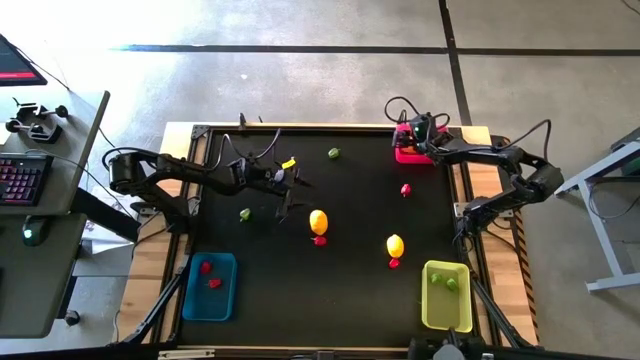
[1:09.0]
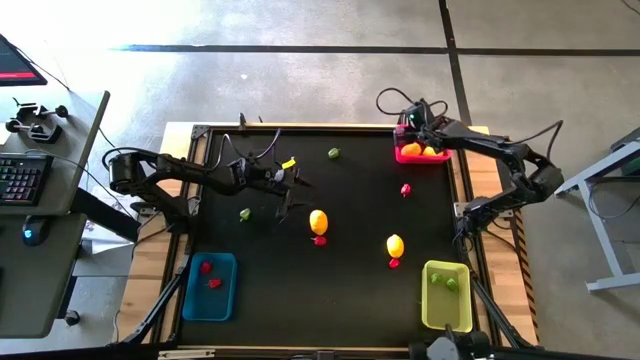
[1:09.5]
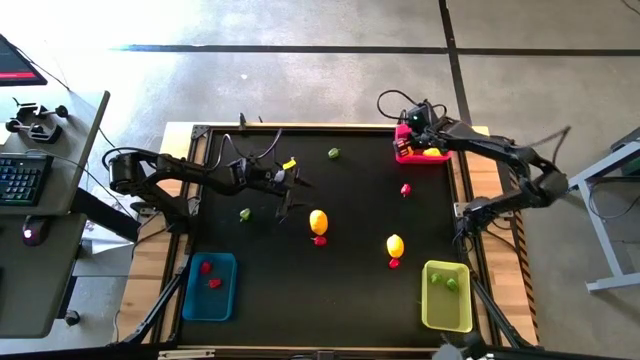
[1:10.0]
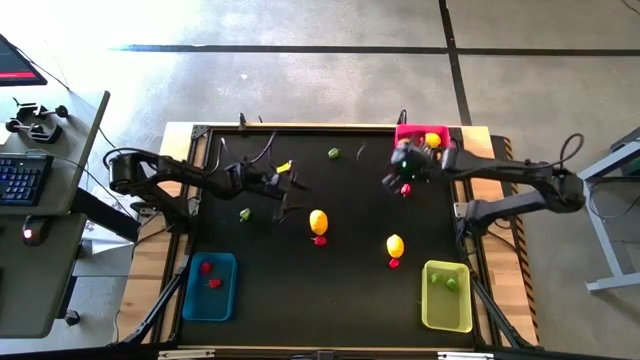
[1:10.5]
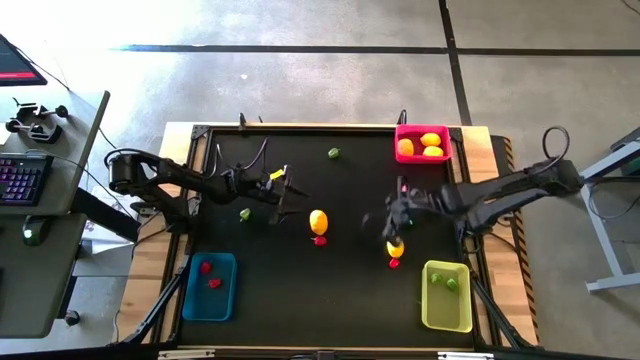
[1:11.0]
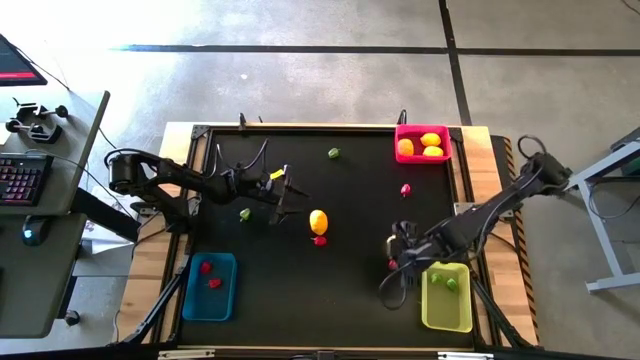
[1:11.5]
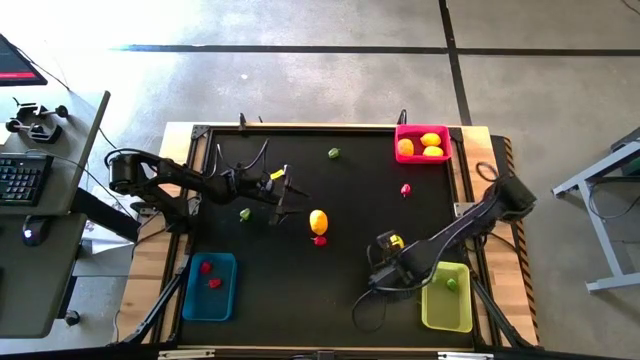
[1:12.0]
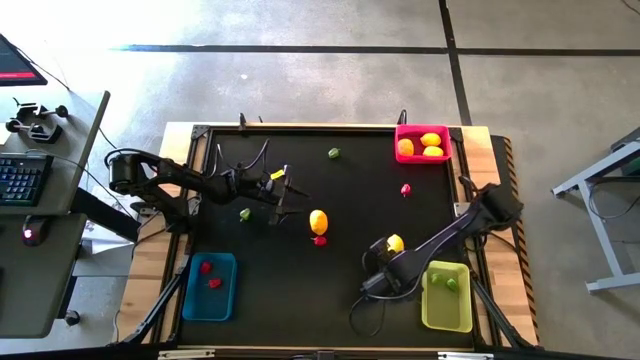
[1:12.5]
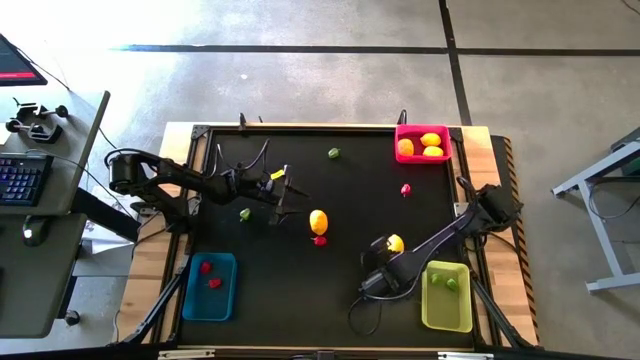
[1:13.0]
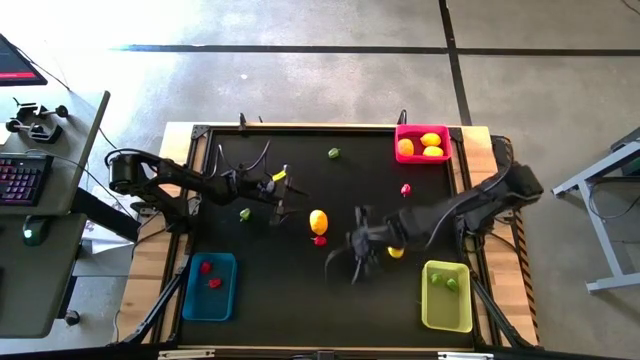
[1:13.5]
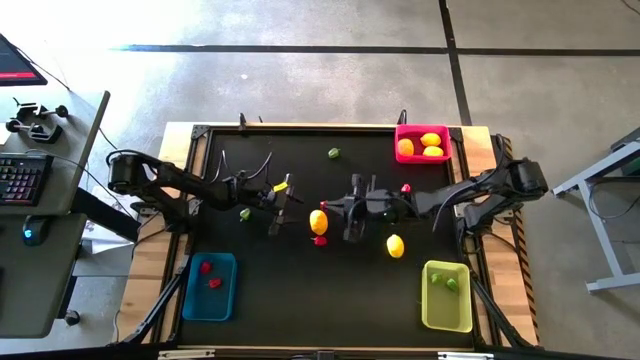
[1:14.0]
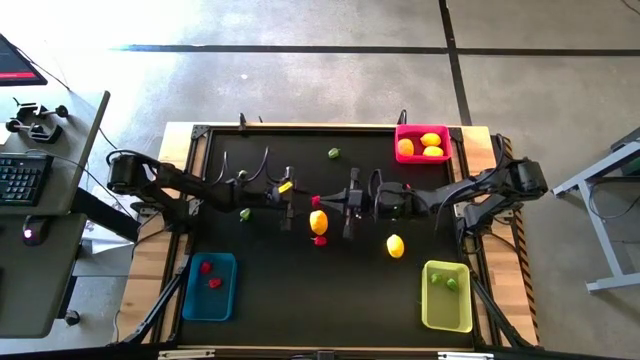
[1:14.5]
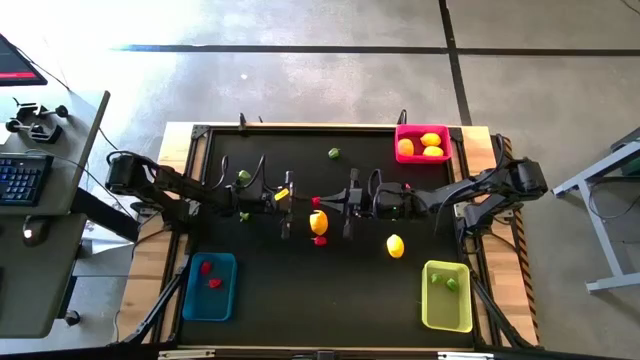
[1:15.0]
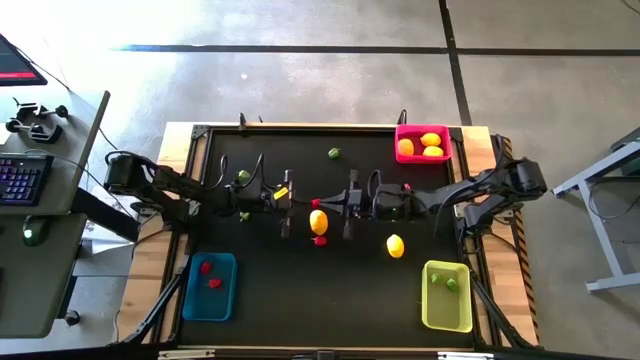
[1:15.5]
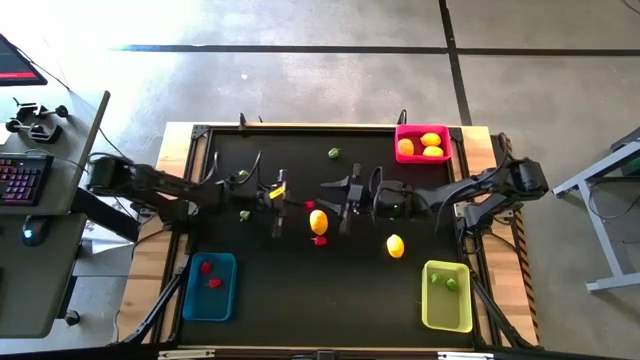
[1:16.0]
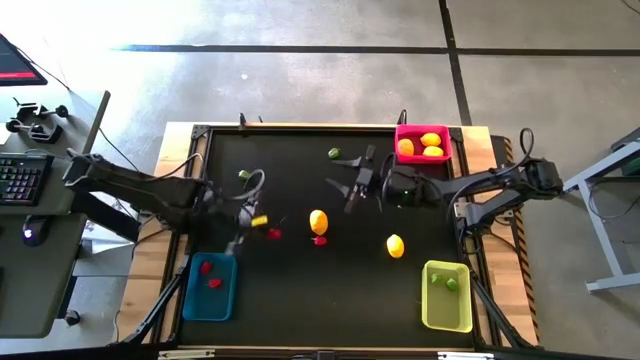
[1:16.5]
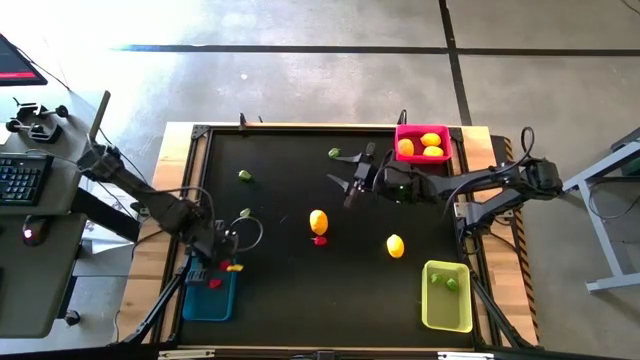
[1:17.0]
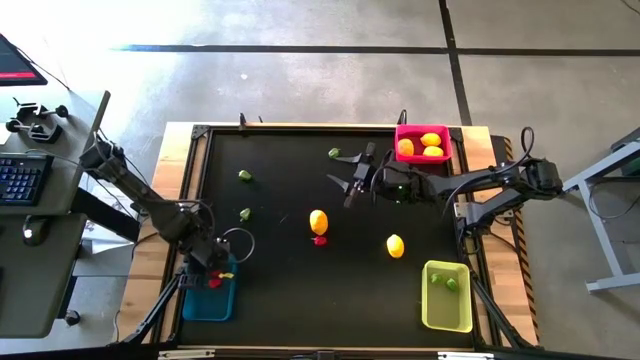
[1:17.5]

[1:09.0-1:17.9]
Task: Sort produce into baskets
Put the red chilli pepper into the blue bin

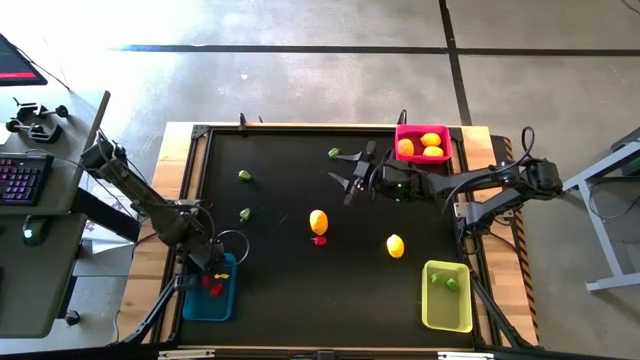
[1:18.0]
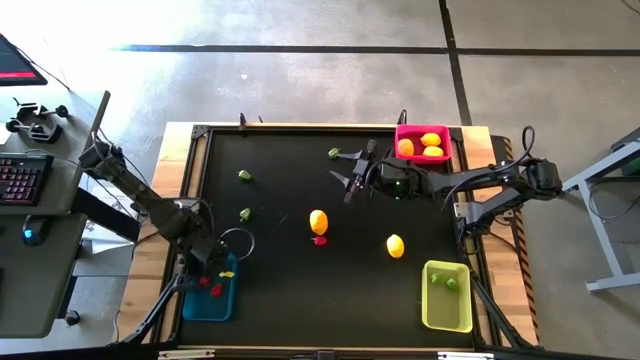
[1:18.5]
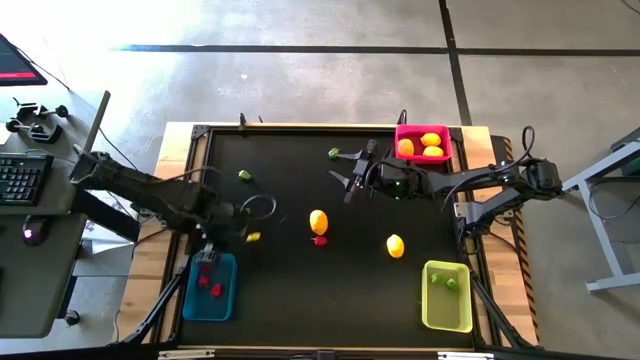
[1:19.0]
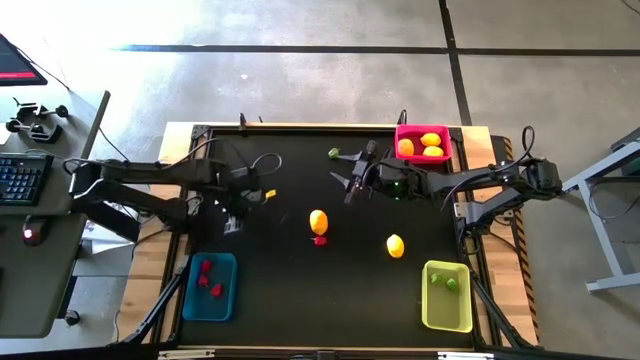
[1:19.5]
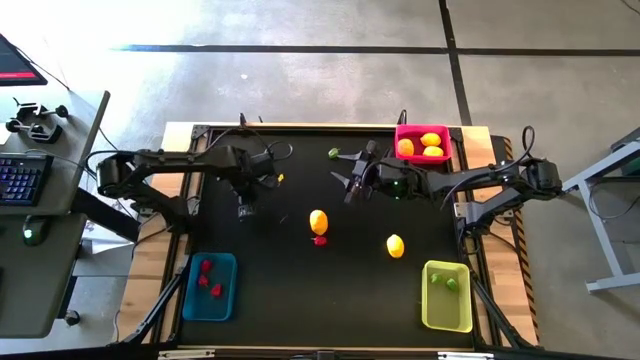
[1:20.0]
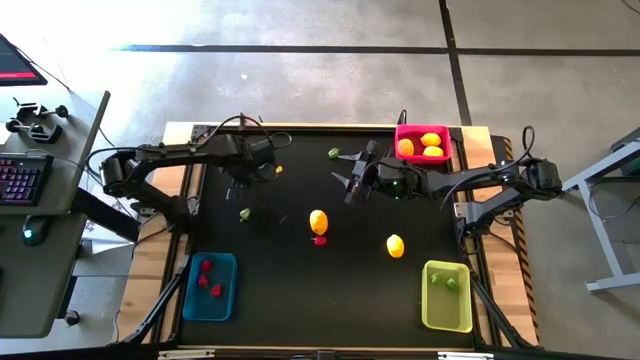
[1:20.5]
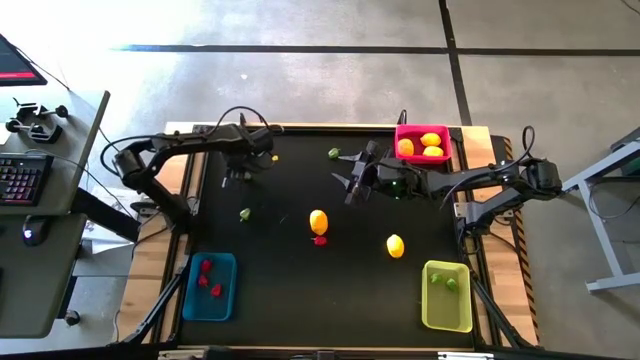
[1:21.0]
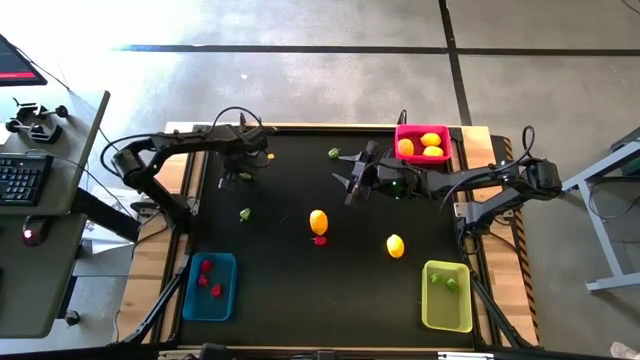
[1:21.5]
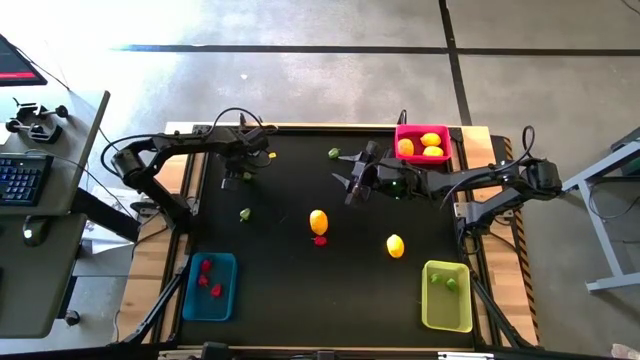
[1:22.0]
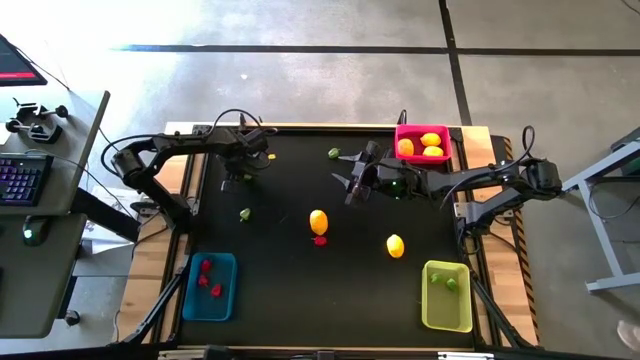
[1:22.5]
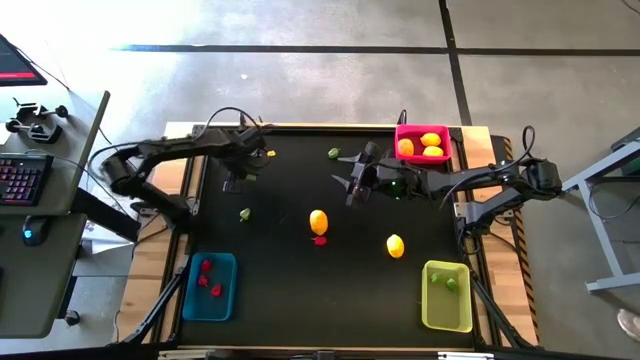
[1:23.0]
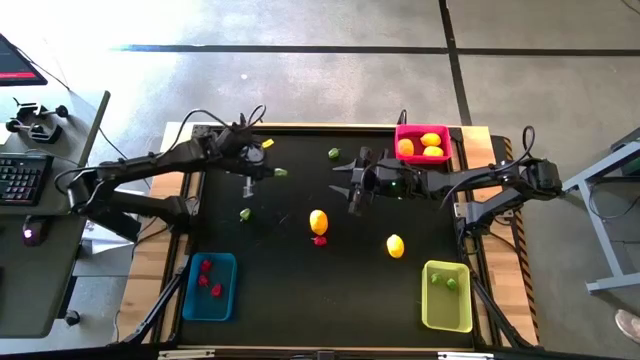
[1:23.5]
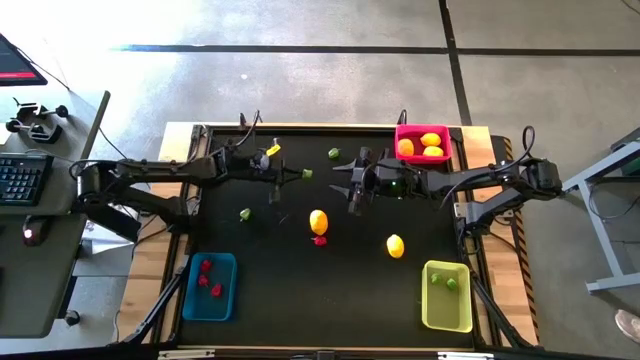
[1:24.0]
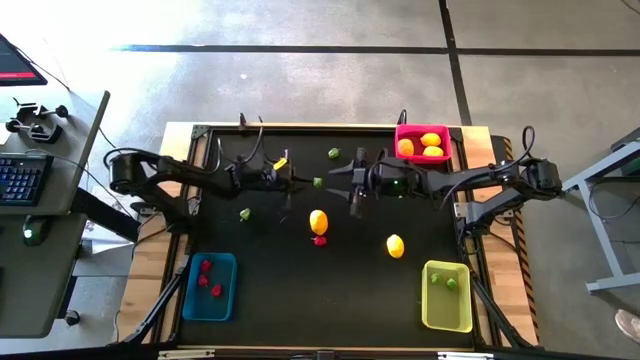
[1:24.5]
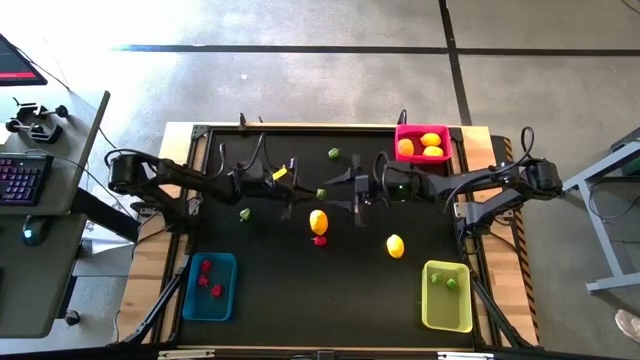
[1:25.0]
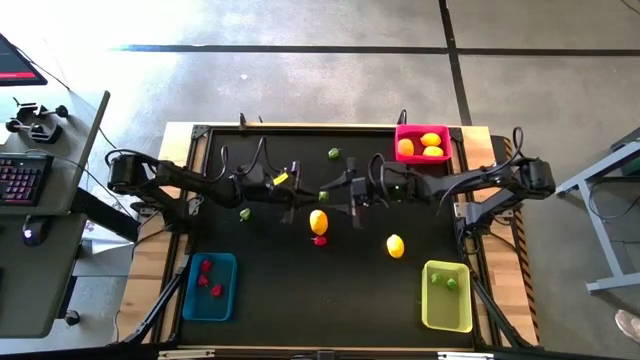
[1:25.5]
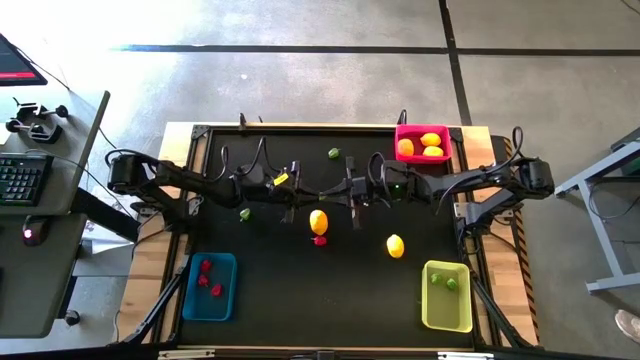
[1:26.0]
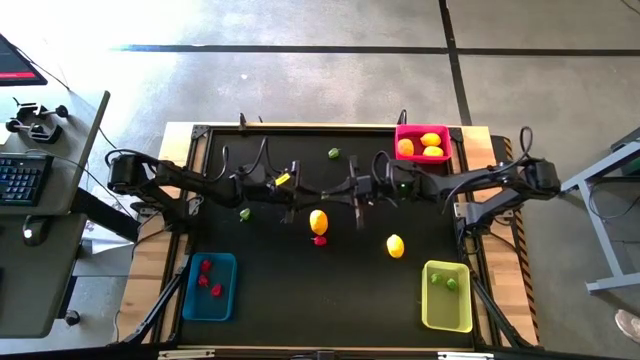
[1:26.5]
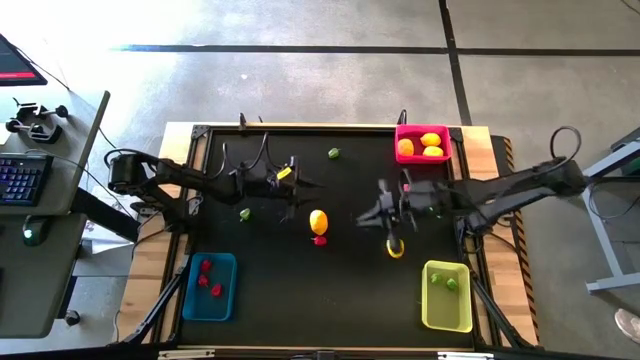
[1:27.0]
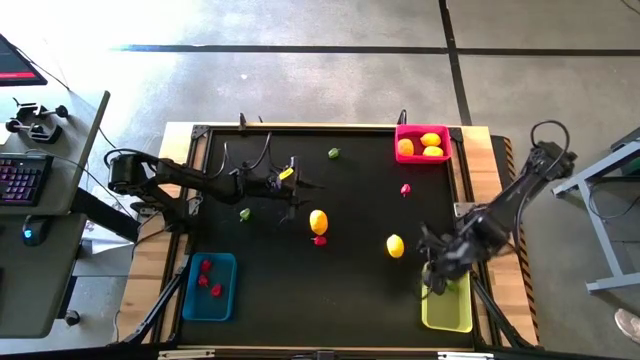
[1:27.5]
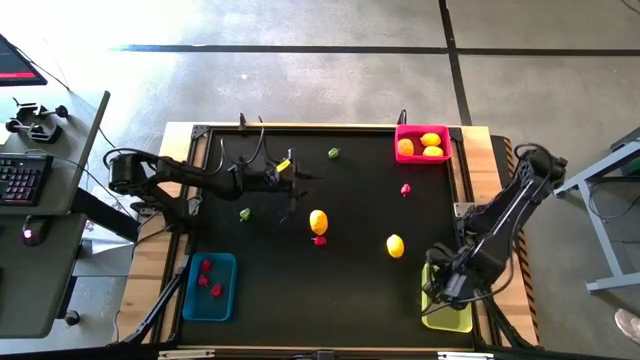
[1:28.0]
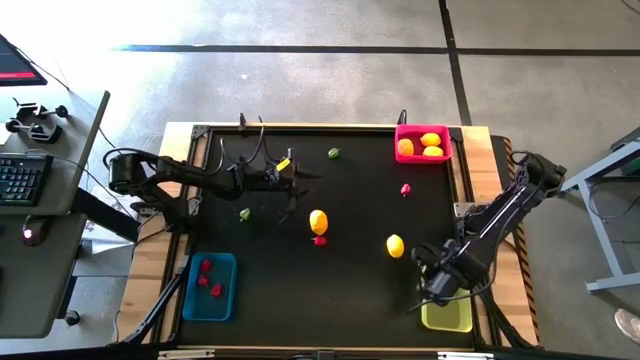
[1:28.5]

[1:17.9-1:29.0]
Put the green chilli pepper into the yellow bin

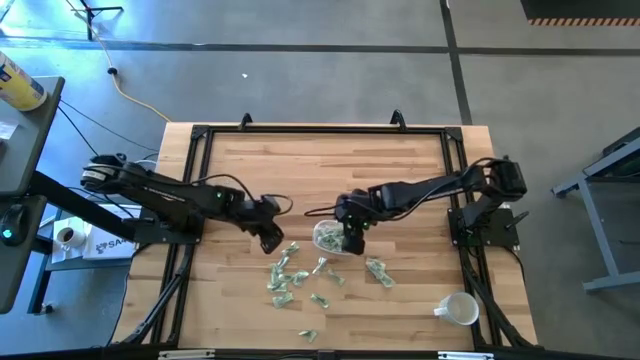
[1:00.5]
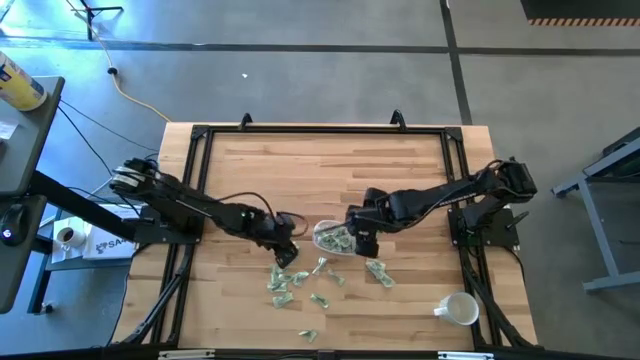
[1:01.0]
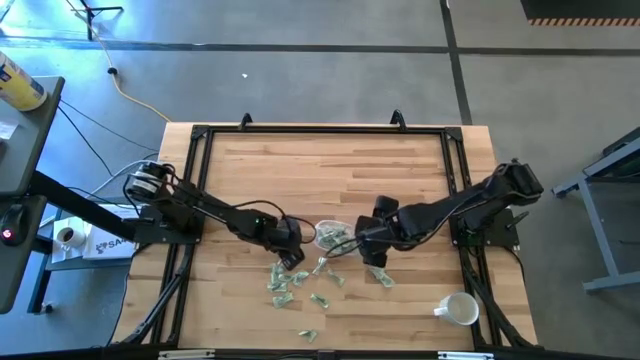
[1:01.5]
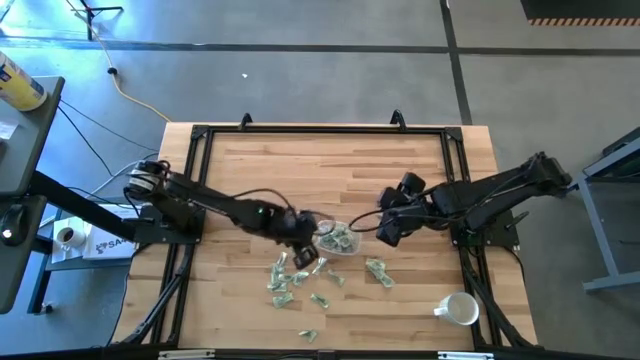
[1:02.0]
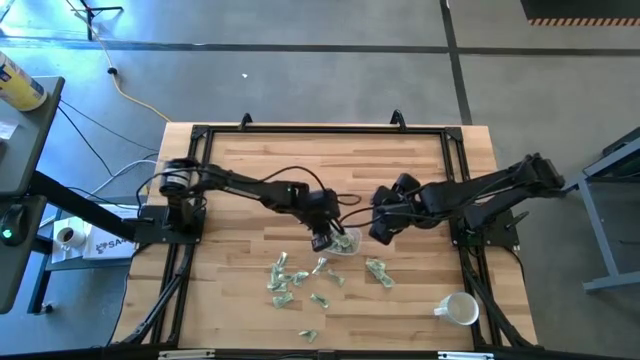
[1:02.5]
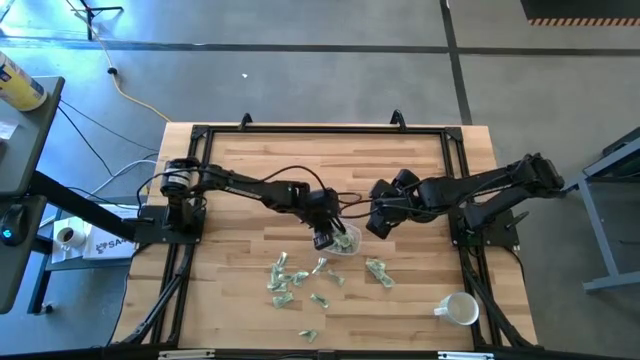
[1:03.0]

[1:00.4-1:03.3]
Task: Pick and place Stevia / Truvia into bins
Put the green stevia packet into the transparent container
